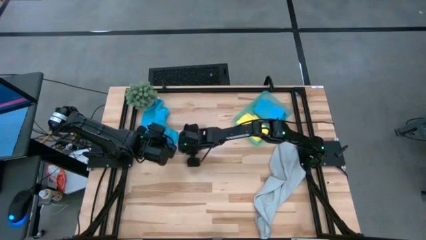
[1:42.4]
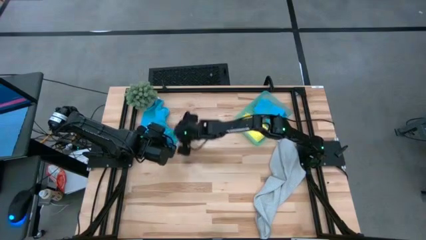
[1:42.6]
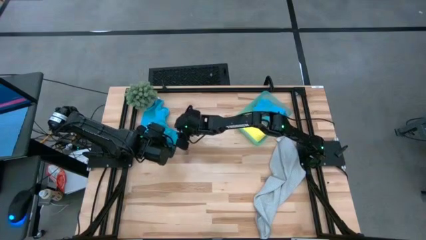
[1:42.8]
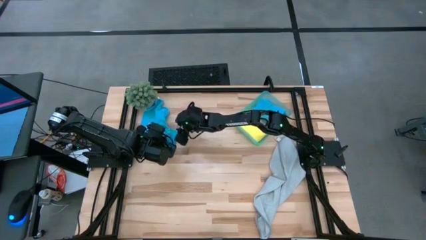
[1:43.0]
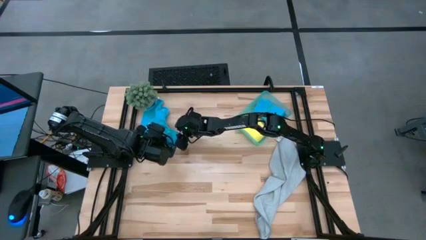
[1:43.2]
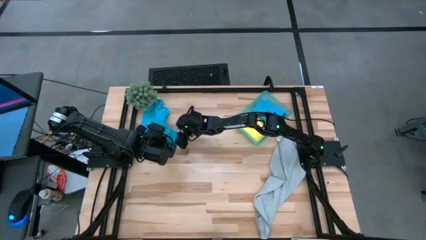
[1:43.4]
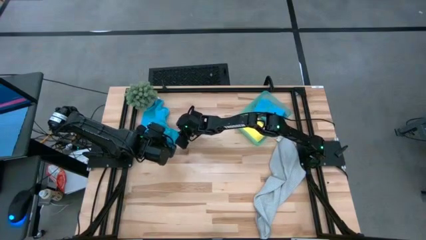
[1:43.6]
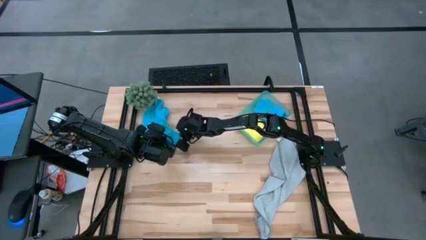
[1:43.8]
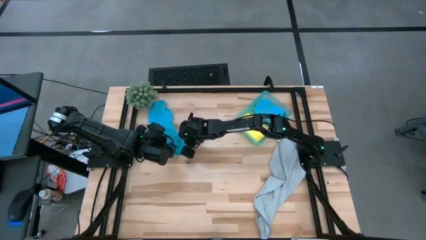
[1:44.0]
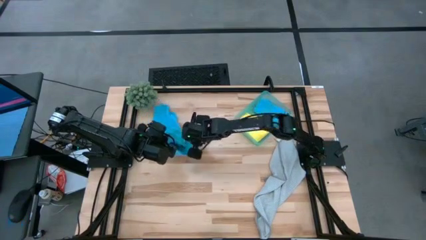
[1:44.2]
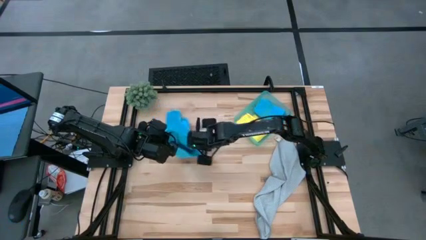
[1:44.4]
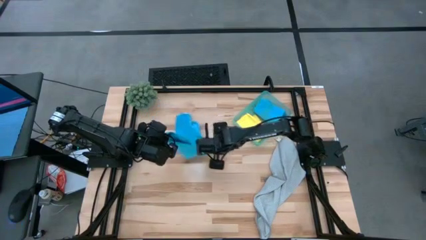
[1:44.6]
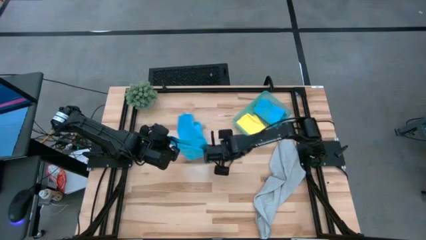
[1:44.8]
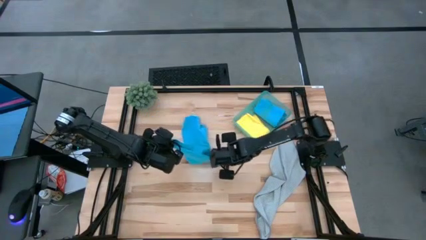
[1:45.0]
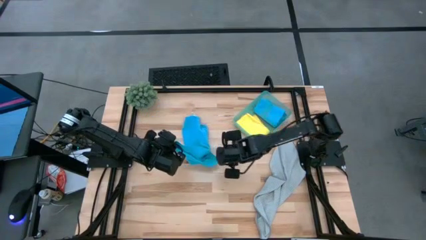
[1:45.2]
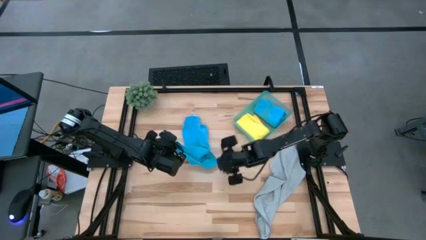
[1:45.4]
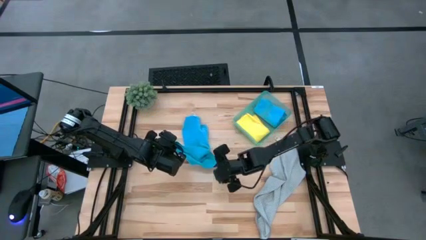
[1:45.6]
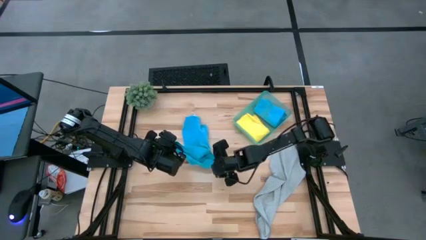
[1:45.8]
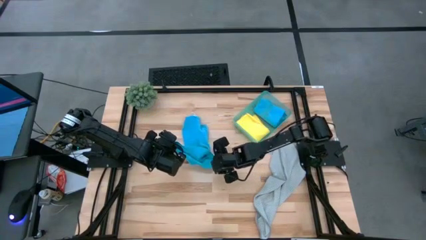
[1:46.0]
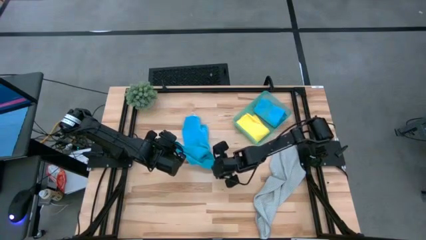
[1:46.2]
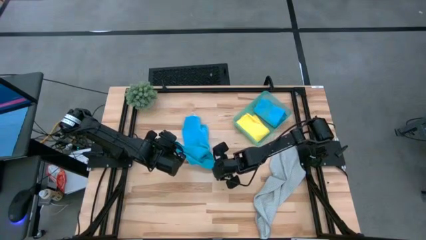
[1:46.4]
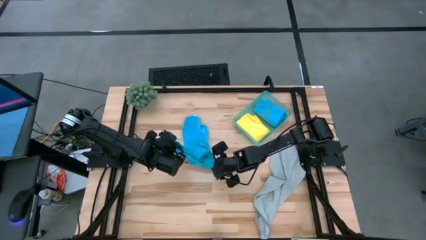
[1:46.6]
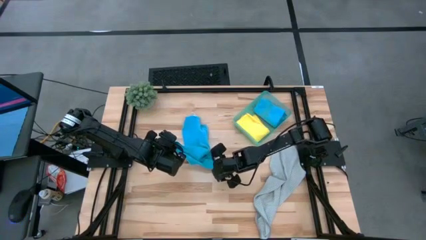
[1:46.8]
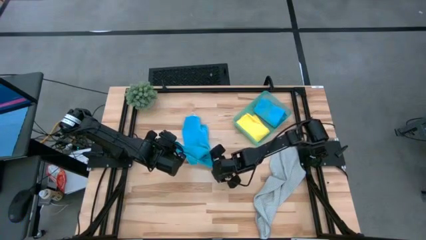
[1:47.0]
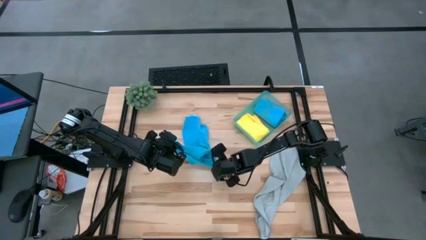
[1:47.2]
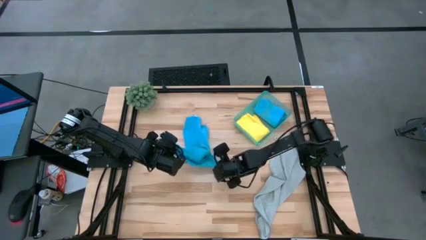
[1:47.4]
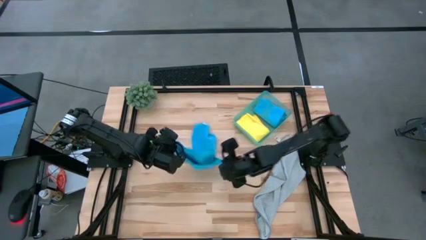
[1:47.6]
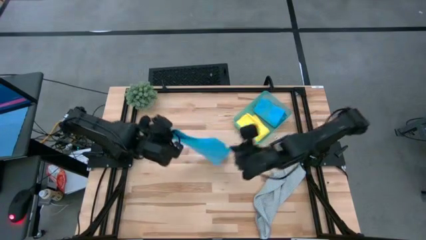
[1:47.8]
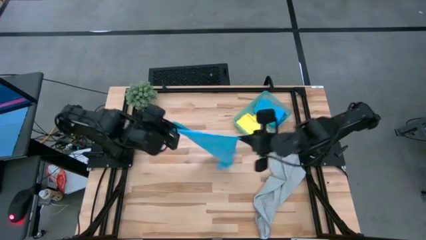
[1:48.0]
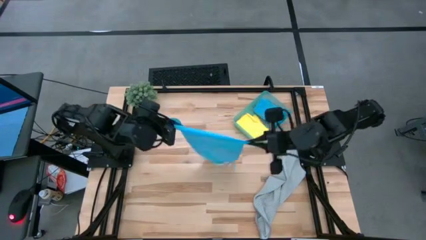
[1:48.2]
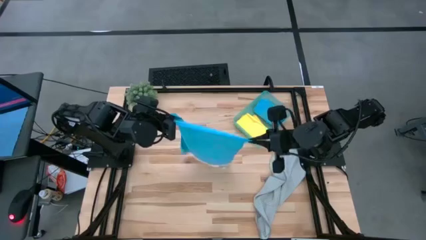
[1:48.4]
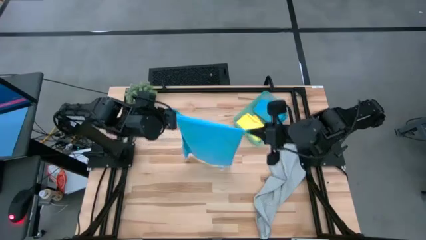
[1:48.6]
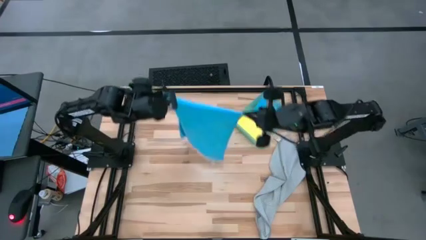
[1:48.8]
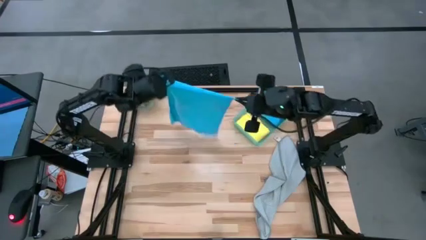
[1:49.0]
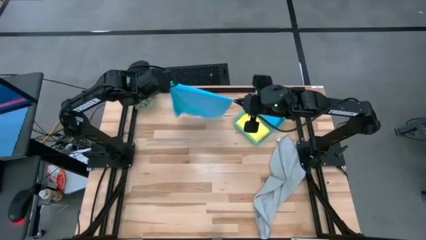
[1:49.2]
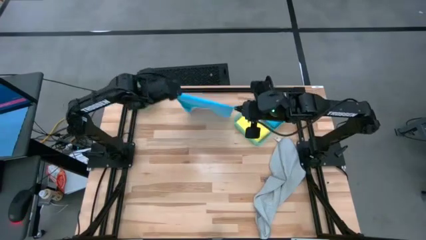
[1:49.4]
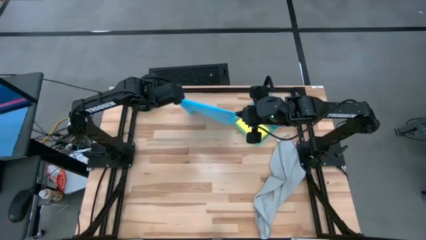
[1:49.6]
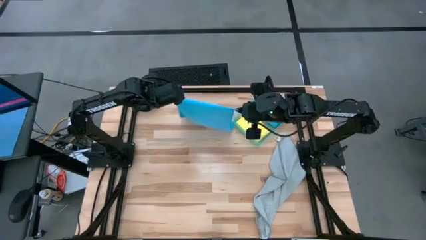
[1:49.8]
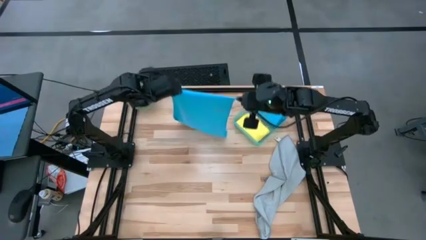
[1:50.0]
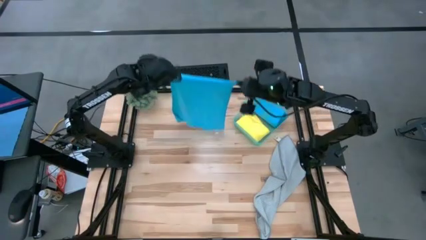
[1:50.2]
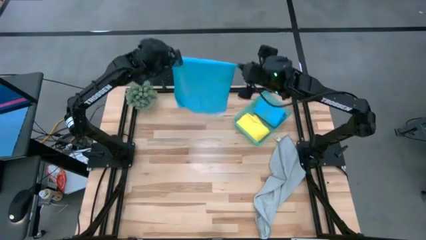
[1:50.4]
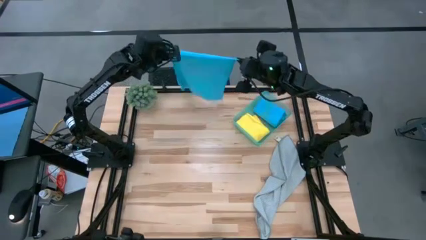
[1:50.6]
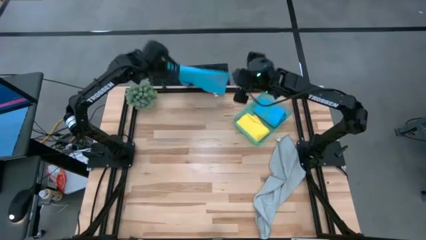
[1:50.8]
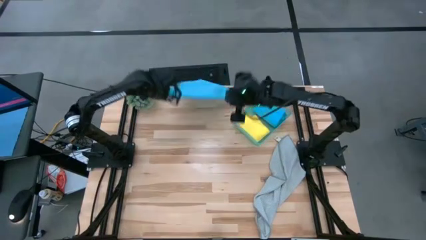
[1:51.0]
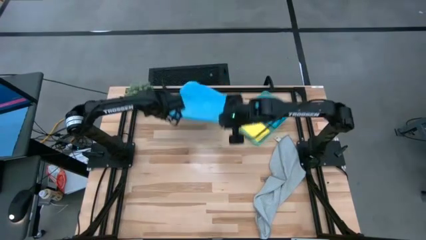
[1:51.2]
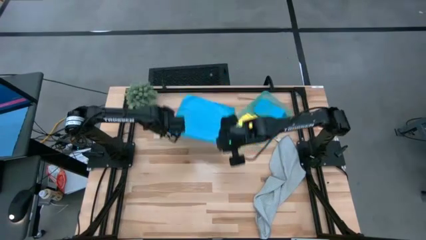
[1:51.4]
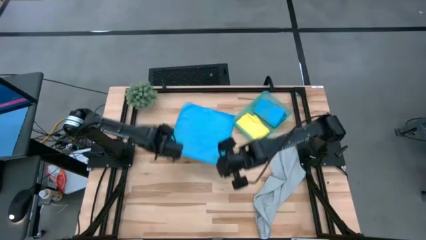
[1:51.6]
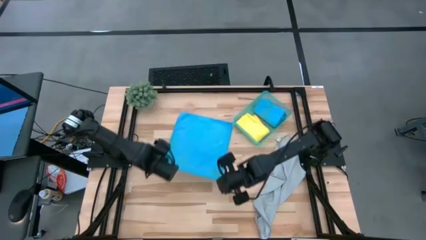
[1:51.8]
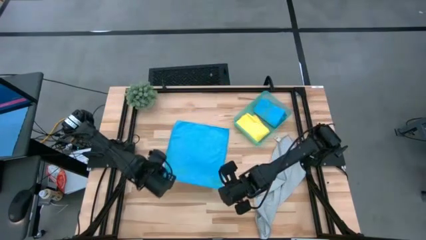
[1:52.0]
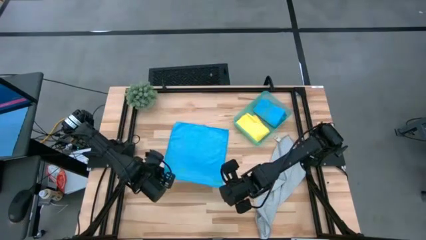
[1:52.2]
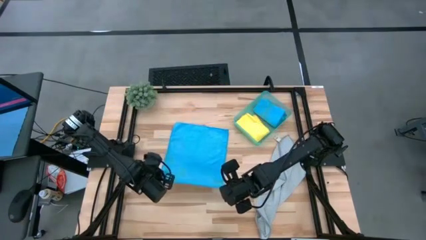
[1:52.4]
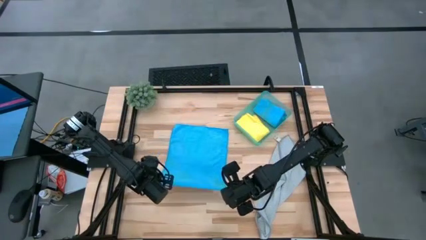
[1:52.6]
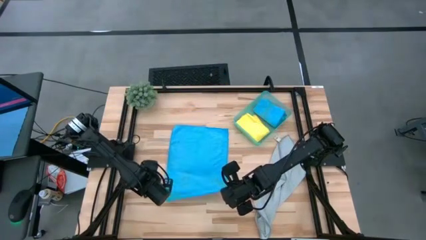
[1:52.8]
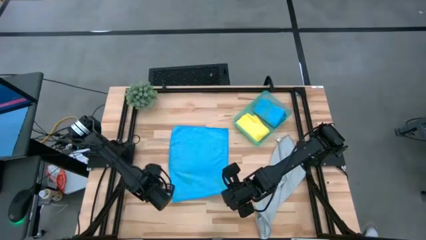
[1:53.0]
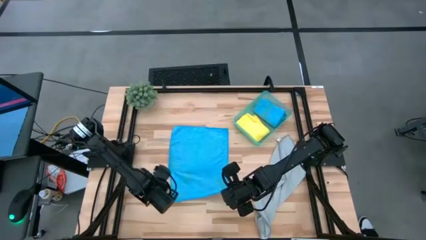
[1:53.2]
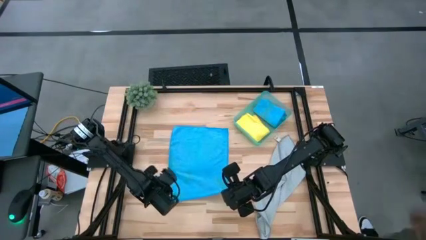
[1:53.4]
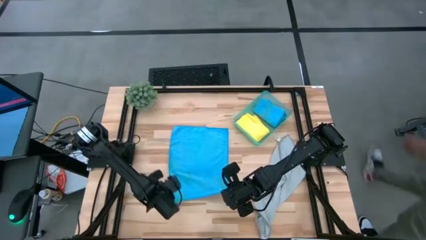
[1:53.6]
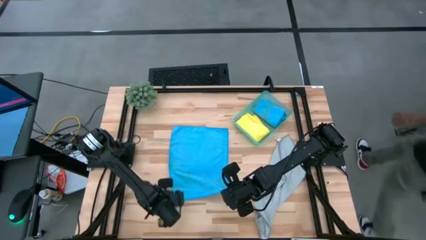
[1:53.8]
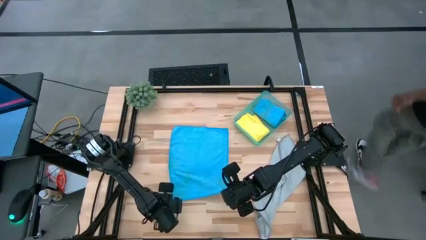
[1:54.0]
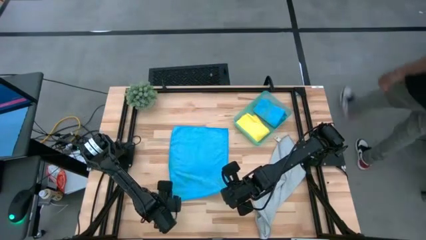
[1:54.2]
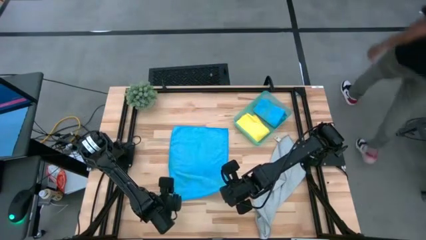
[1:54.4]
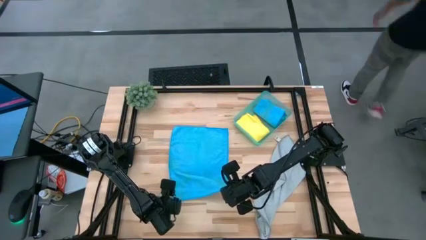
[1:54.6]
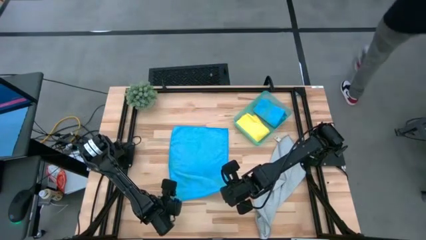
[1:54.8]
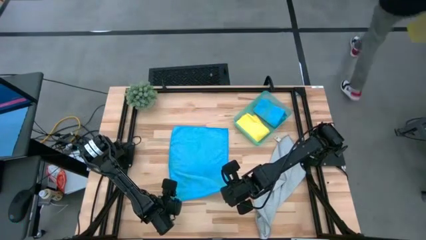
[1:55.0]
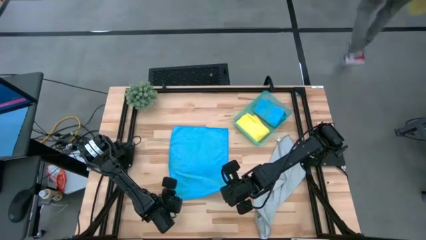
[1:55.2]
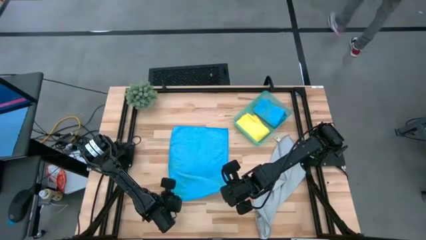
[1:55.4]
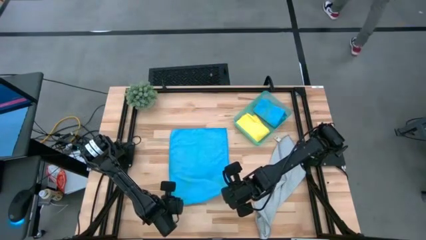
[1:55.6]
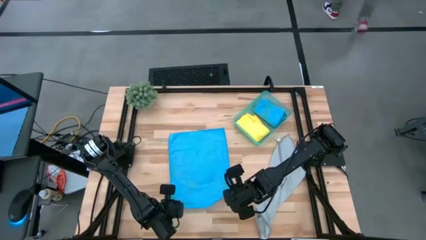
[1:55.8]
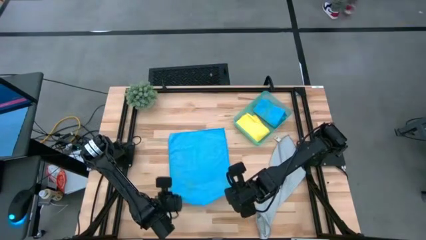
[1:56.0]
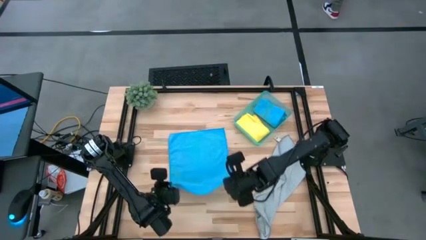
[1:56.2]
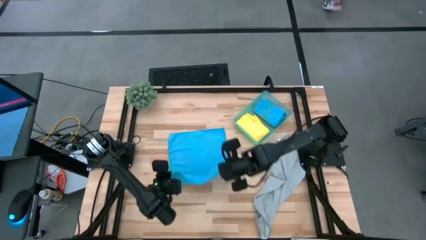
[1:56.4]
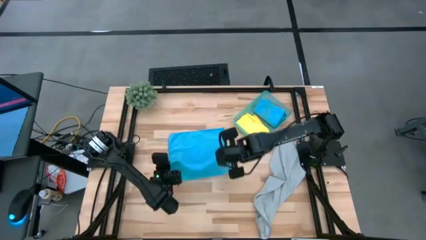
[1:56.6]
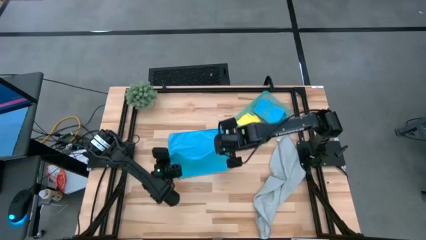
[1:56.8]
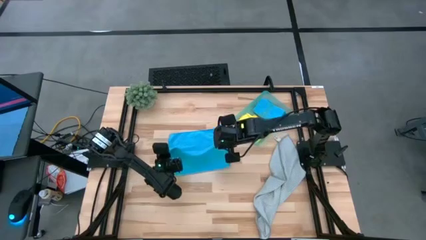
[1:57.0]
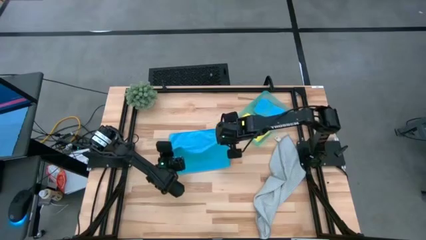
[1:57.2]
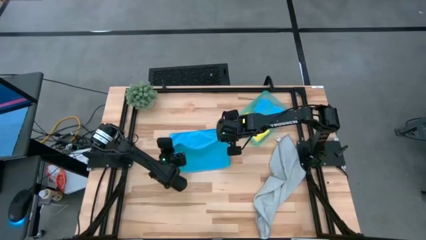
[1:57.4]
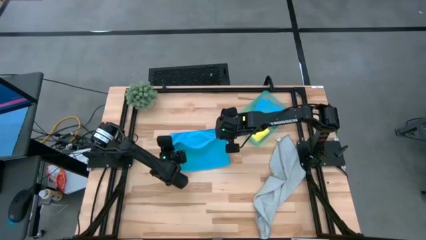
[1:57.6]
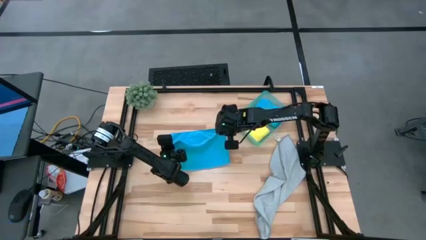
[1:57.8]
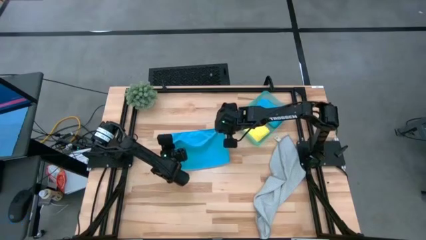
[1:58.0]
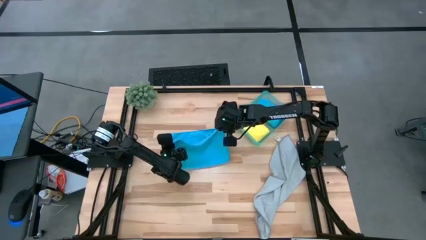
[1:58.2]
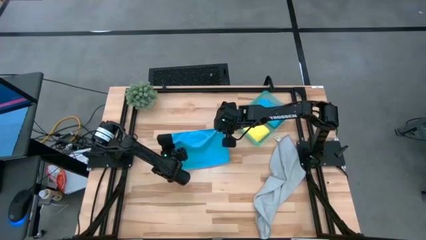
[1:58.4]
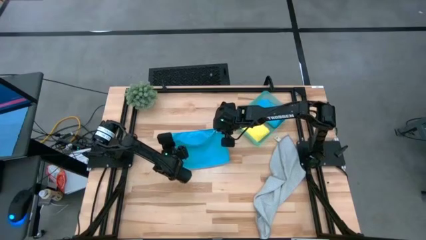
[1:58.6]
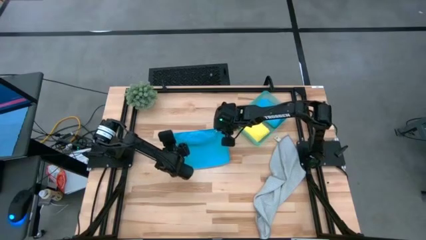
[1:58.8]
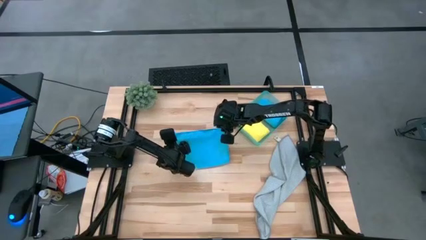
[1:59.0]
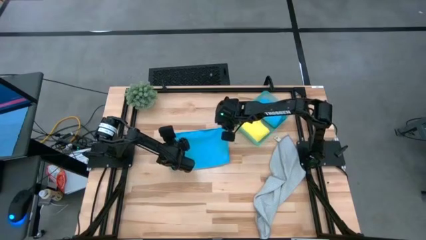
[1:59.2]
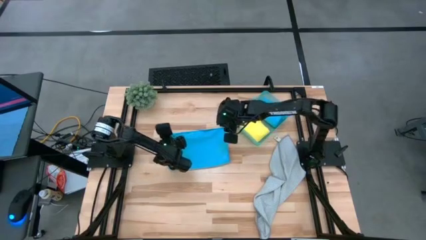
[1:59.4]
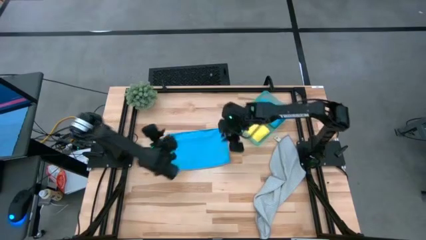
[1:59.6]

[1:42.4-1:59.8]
Task: Fold microfiber towels
Fold the blue towel
